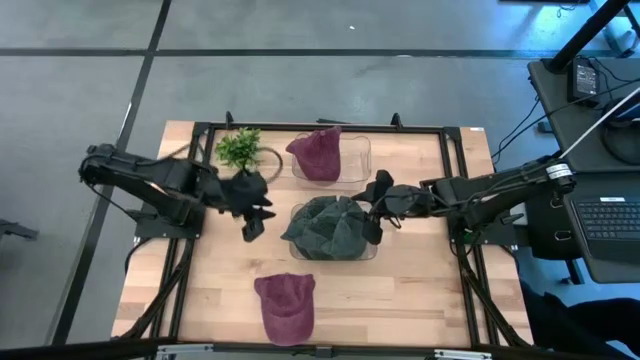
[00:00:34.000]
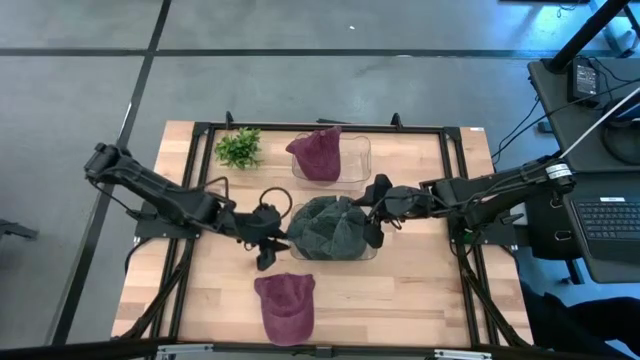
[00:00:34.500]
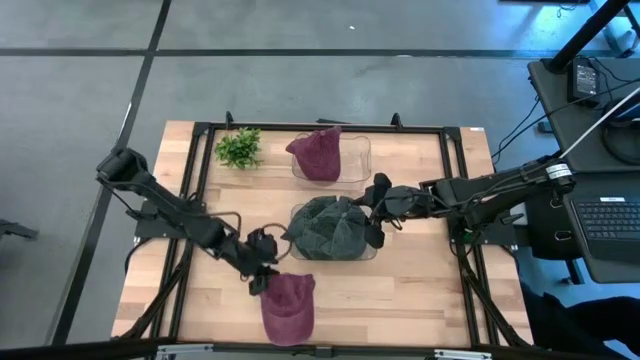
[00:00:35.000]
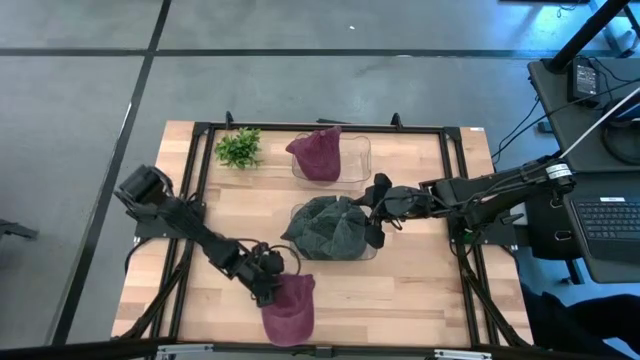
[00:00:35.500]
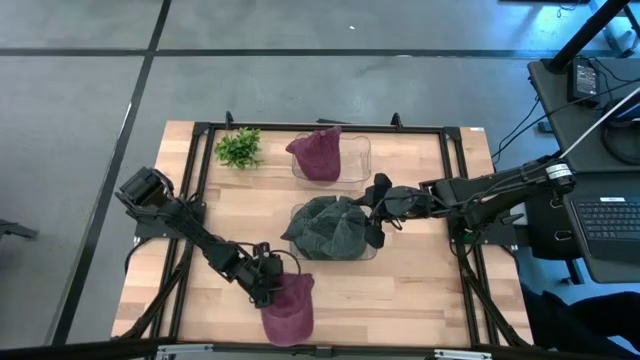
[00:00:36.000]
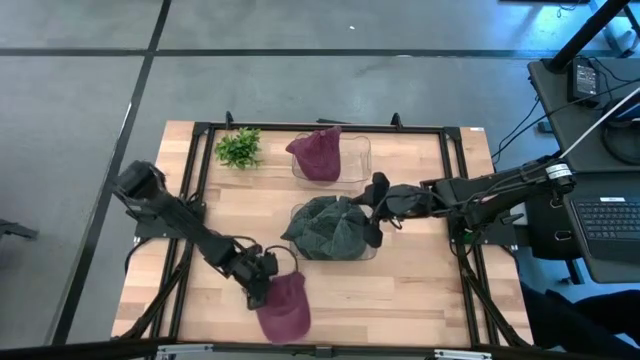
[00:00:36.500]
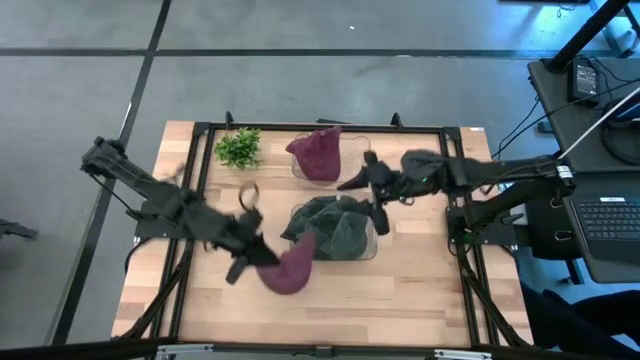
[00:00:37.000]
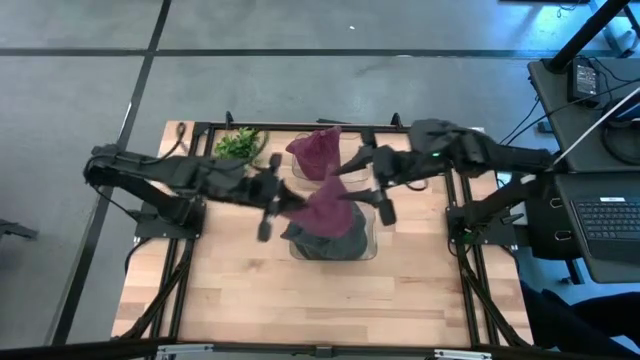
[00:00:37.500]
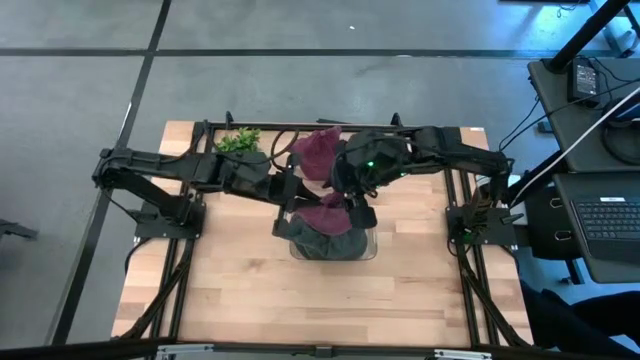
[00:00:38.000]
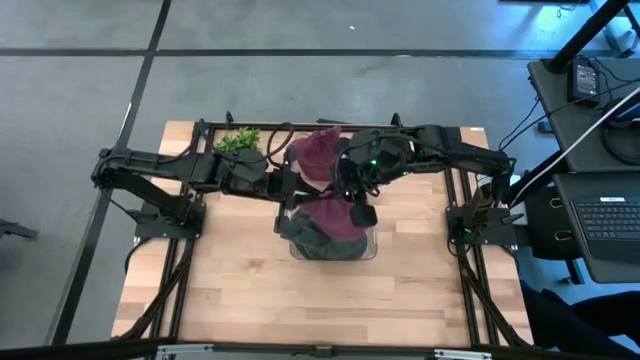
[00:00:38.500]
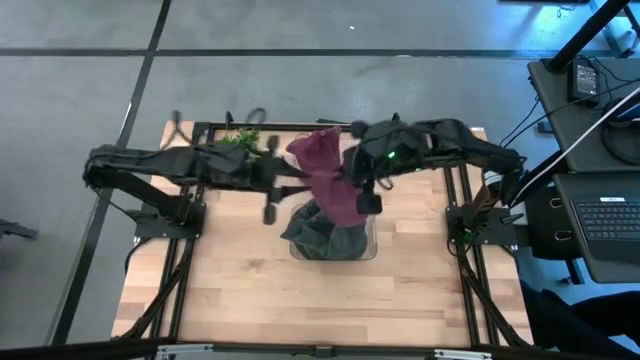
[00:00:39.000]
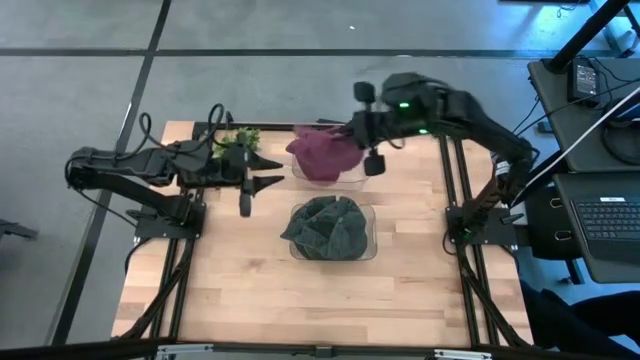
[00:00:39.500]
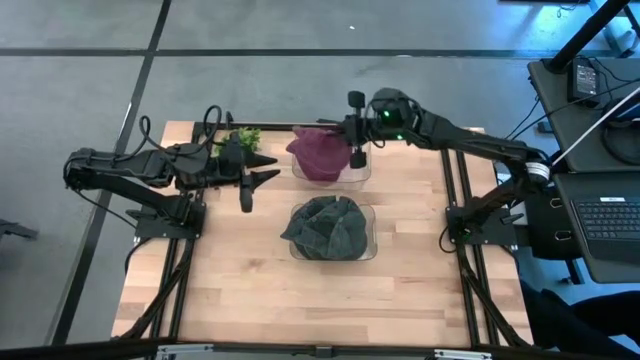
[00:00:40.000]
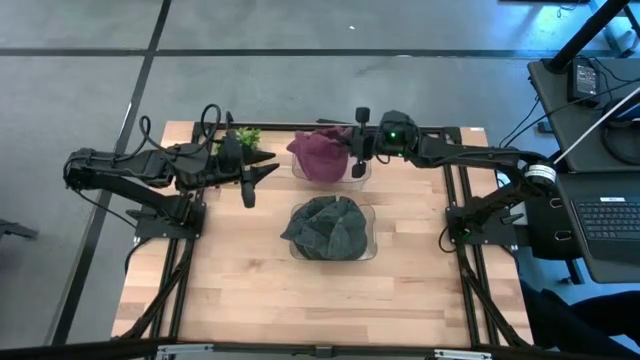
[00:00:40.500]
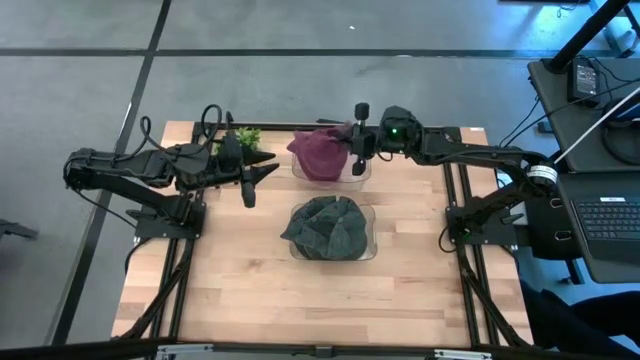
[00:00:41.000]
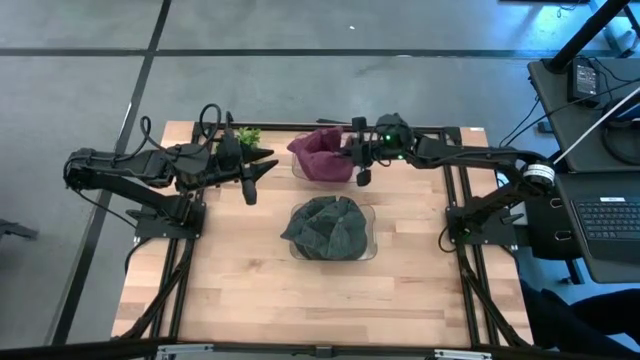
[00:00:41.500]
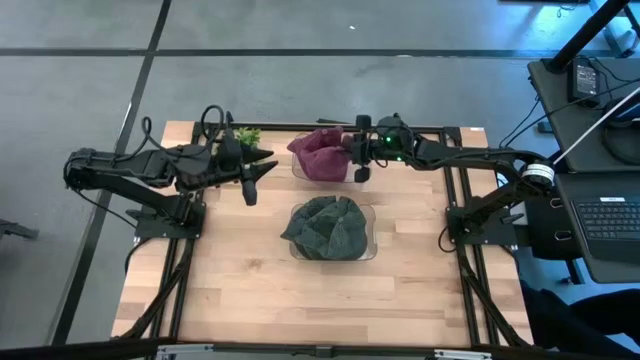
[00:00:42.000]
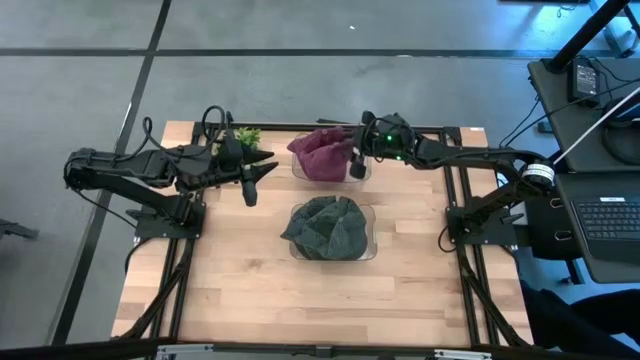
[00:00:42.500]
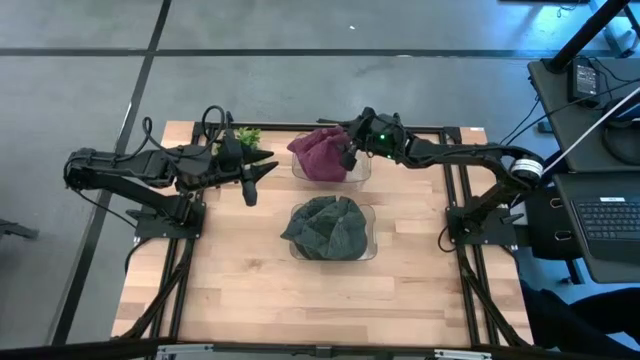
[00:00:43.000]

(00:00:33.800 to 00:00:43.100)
Task: Pick & Place hat
Put the red cap into the top transparent bin

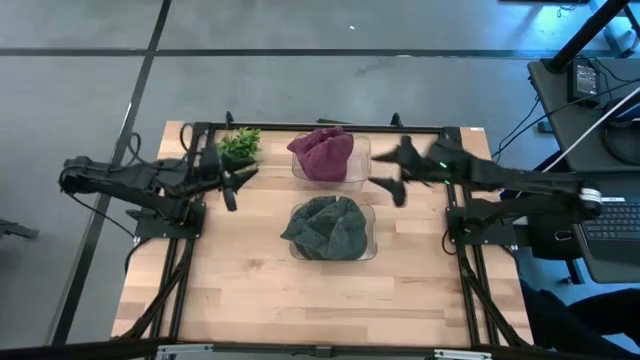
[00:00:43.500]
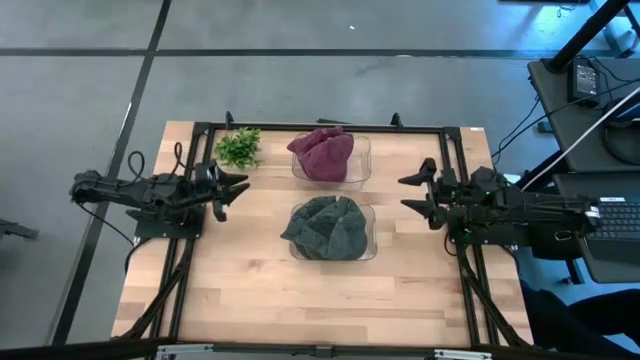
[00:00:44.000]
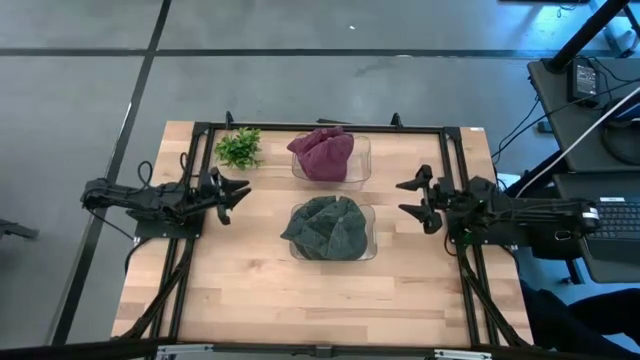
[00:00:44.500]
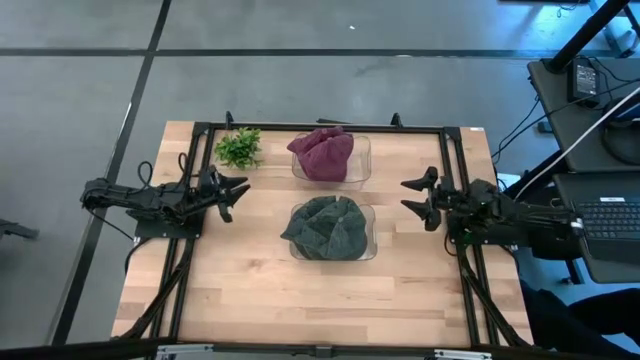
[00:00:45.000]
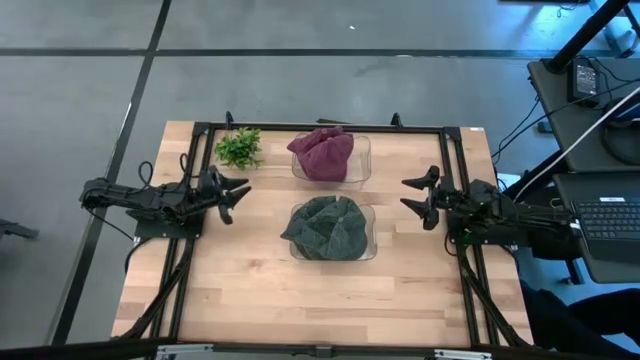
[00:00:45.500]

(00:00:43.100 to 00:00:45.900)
Return to Home Position

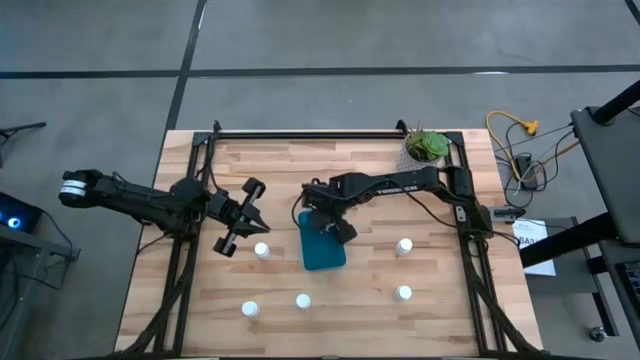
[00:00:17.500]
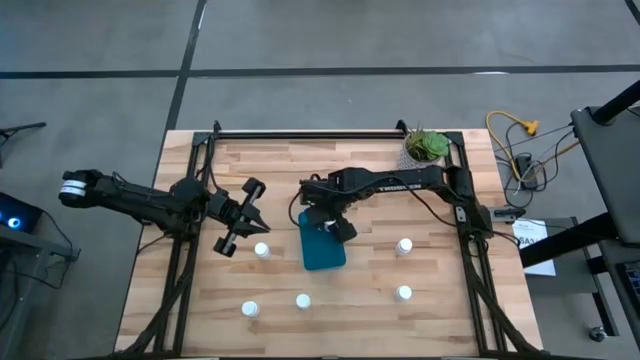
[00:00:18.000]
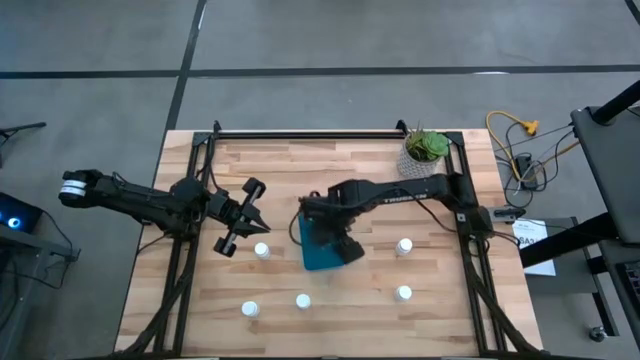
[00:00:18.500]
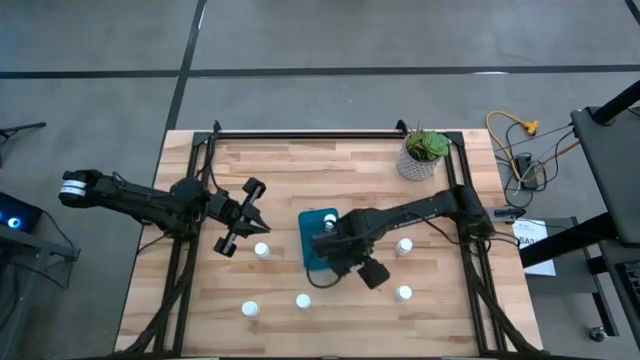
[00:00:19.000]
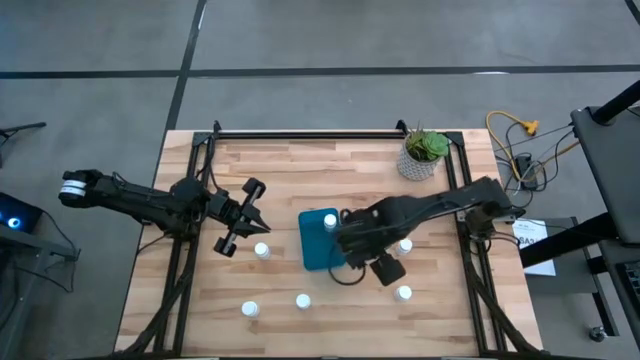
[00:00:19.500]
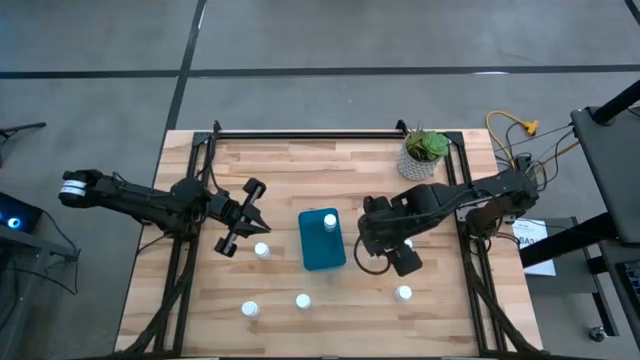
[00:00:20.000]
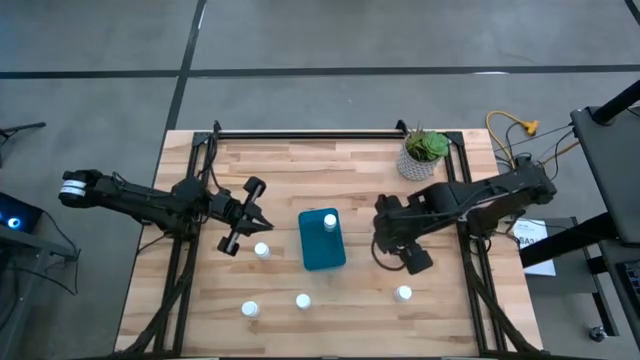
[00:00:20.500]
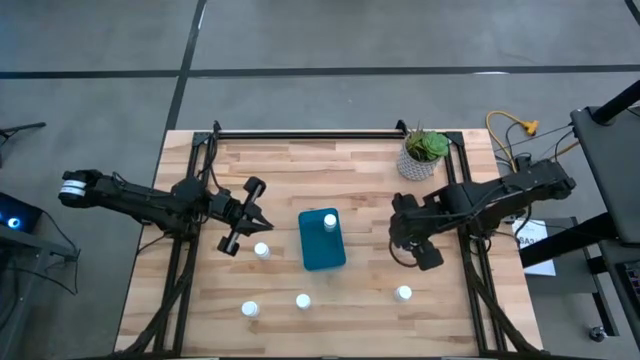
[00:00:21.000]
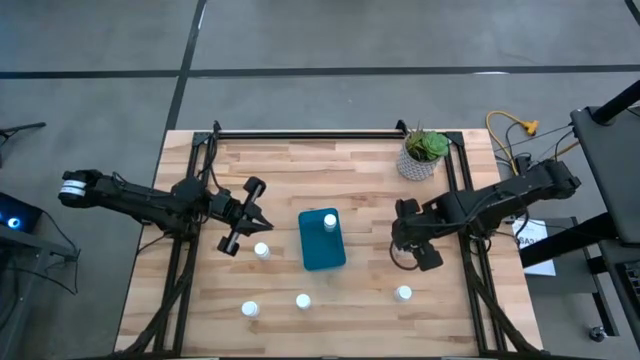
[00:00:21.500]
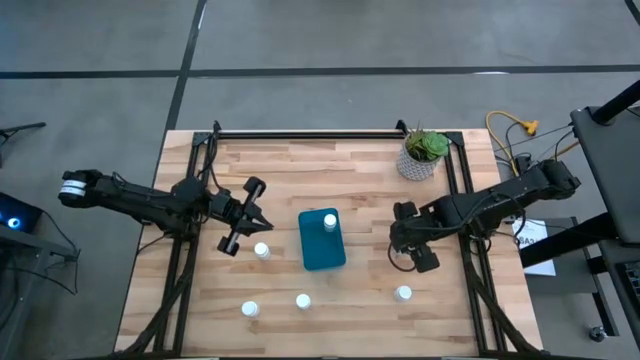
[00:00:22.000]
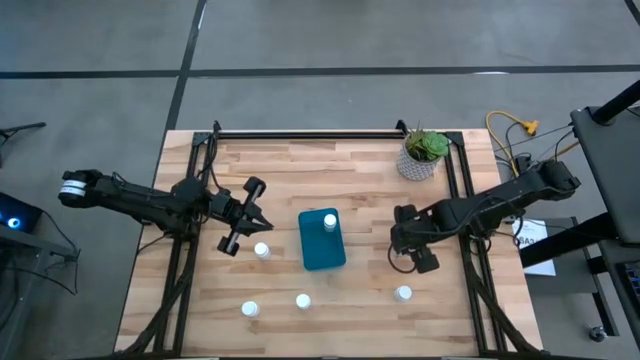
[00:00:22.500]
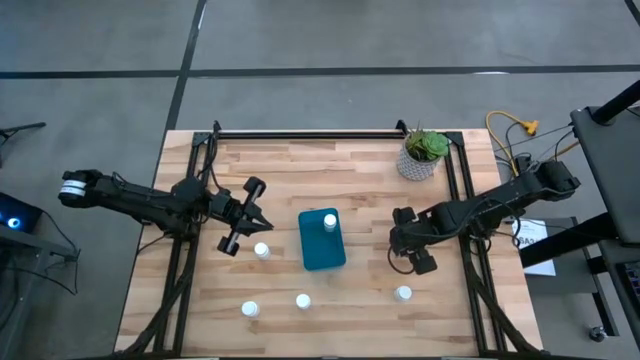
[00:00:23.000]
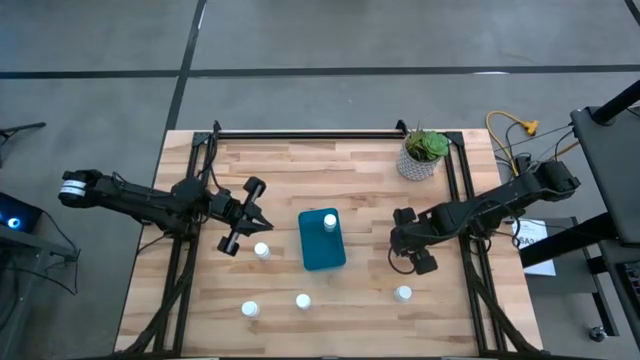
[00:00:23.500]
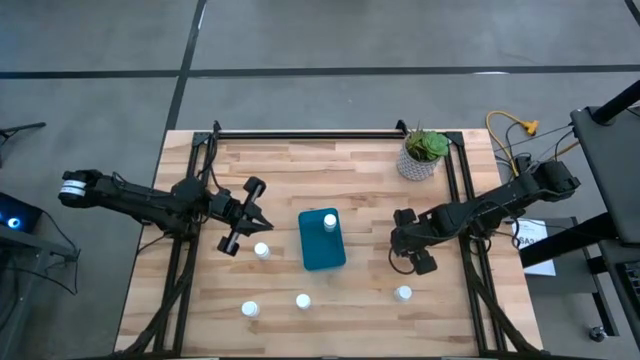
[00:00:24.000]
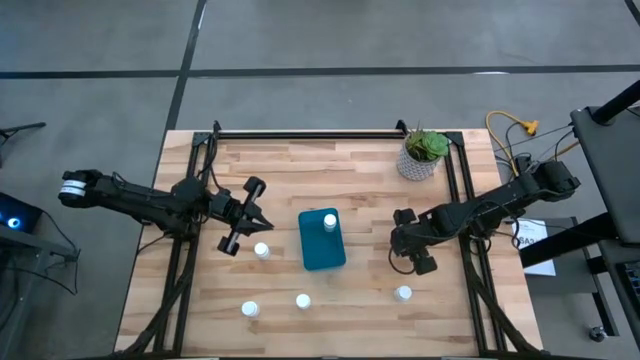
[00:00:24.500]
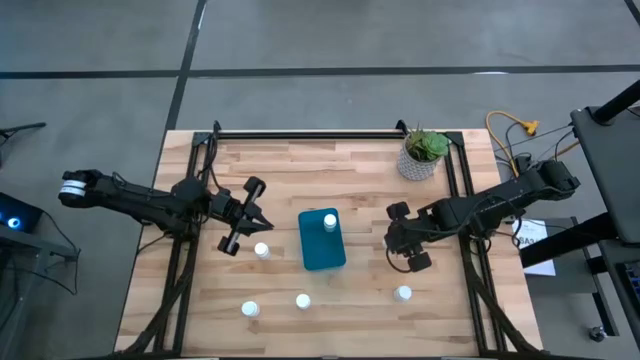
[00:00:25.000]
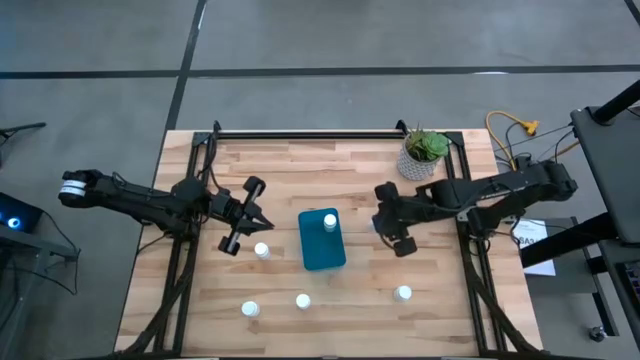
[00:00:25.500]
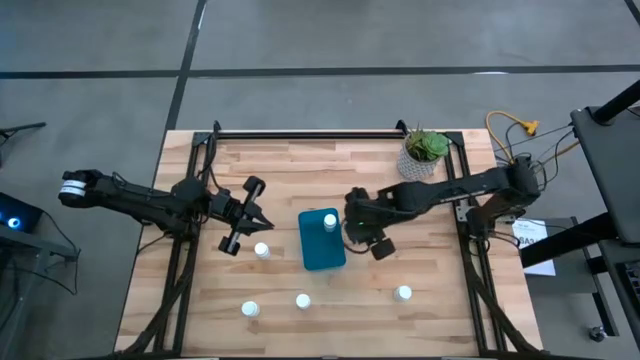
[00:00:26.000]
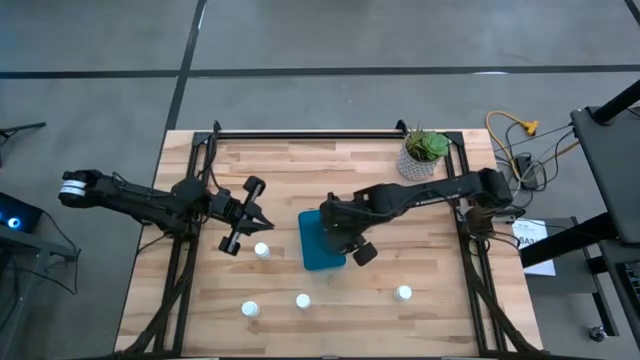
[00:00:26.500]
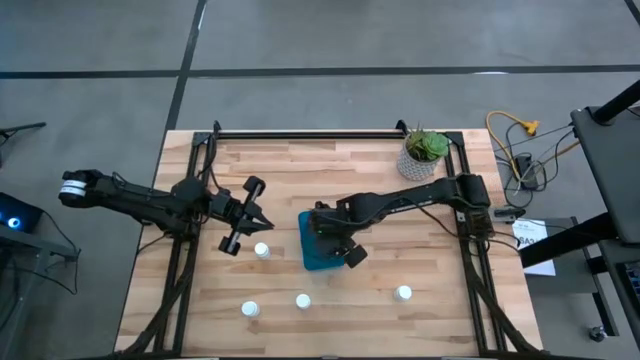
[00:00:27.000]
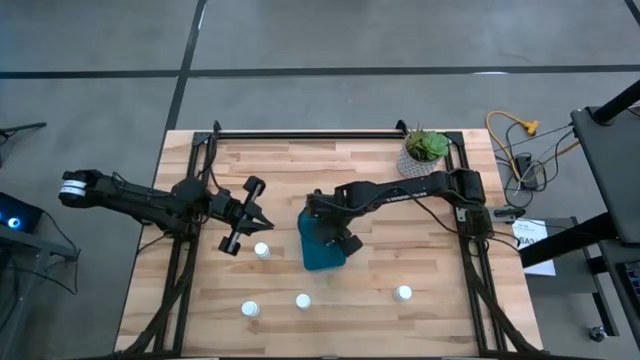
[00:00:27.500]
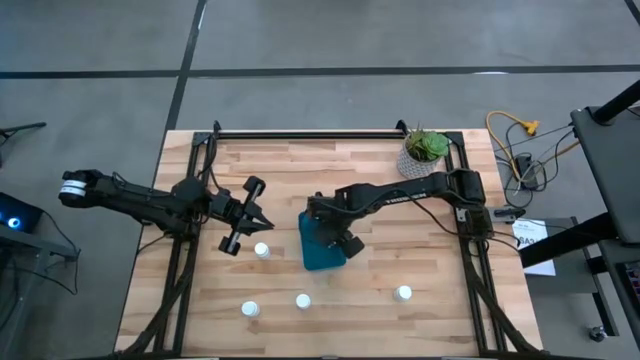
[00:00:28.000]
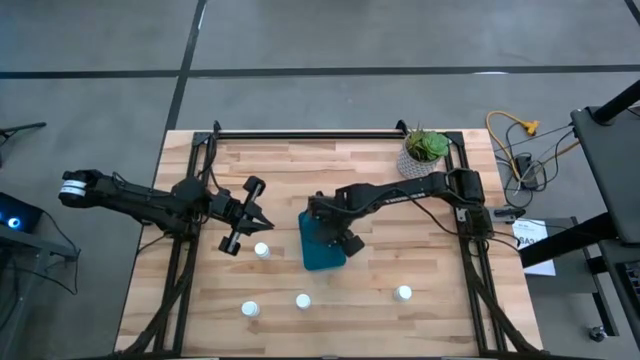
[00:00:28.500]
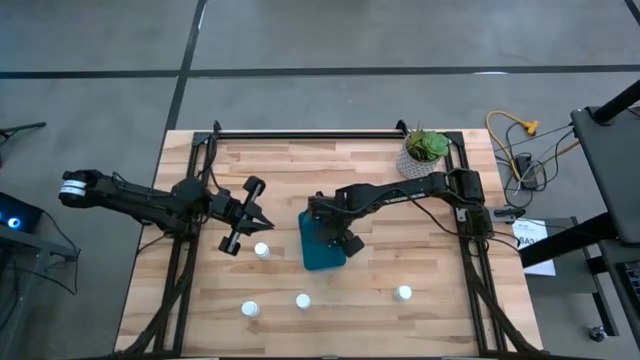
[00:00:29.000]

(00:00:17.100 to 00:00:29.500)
Task: Pick and place pill bottles into a basket
Put the white pill bottle into the blue bin
